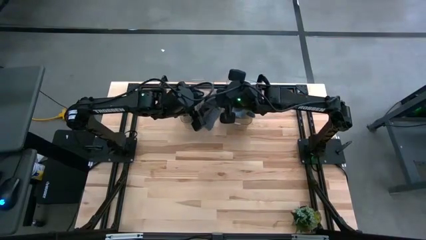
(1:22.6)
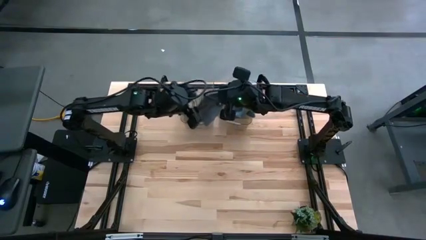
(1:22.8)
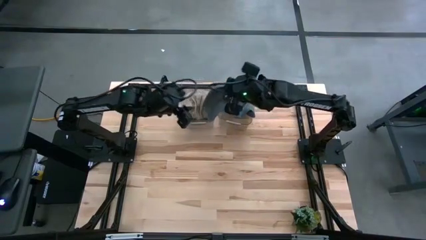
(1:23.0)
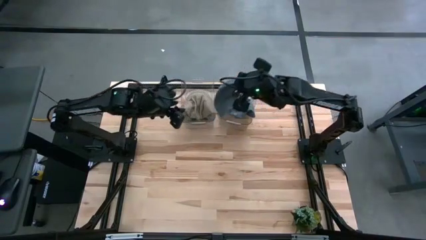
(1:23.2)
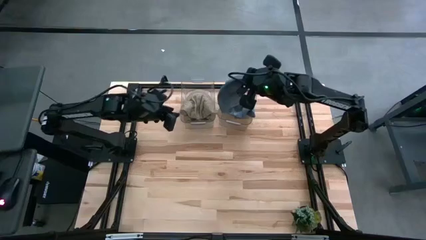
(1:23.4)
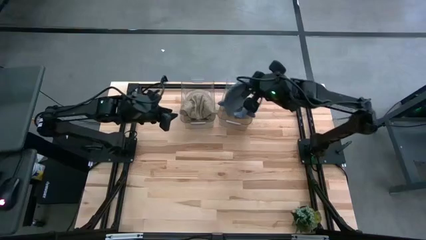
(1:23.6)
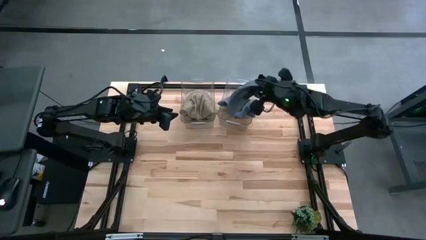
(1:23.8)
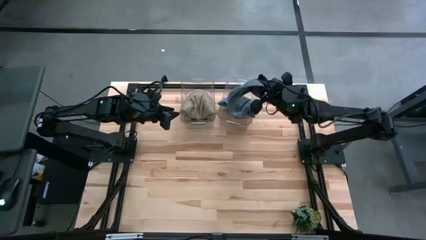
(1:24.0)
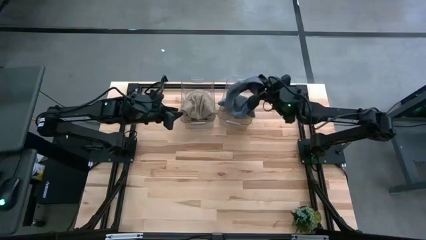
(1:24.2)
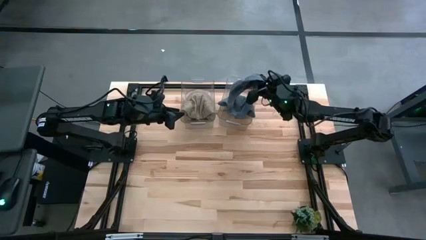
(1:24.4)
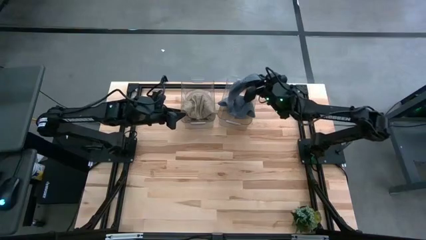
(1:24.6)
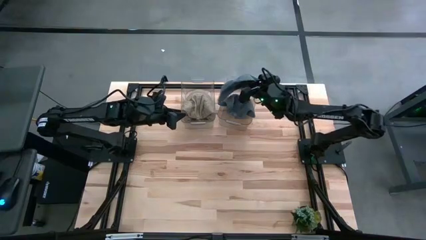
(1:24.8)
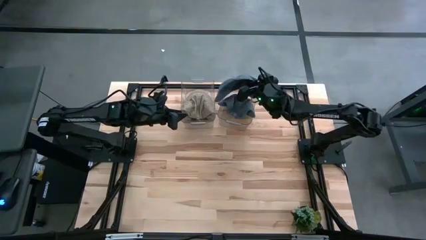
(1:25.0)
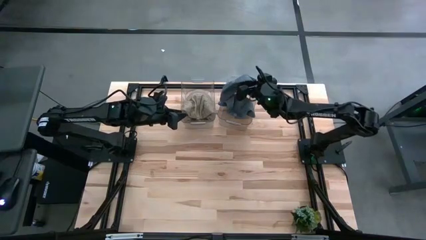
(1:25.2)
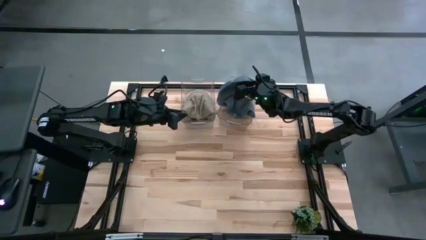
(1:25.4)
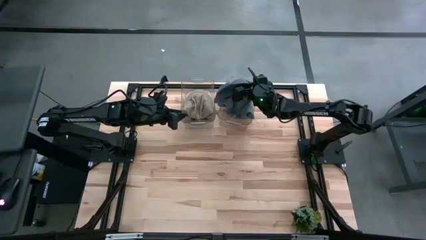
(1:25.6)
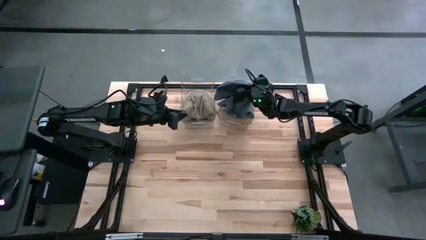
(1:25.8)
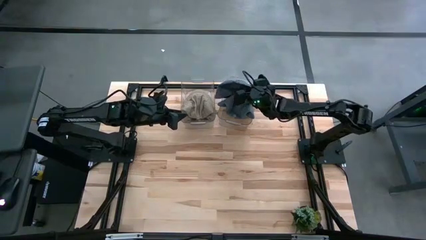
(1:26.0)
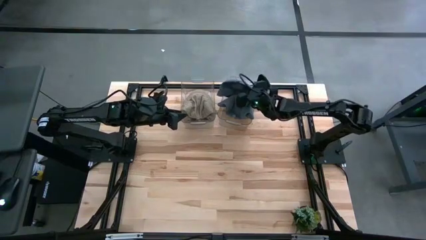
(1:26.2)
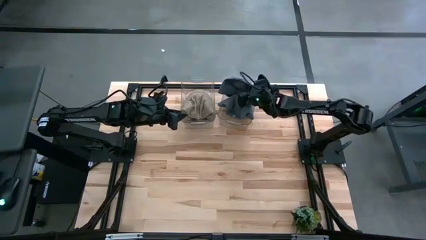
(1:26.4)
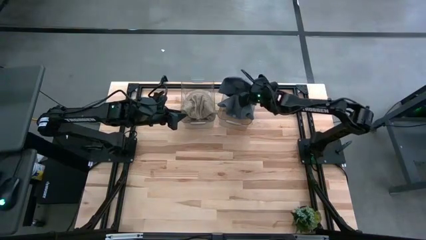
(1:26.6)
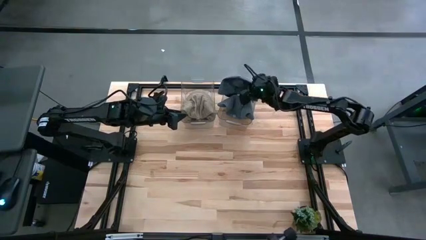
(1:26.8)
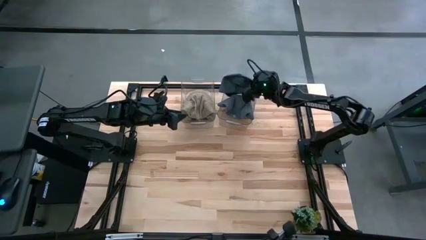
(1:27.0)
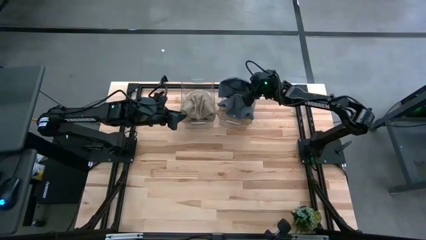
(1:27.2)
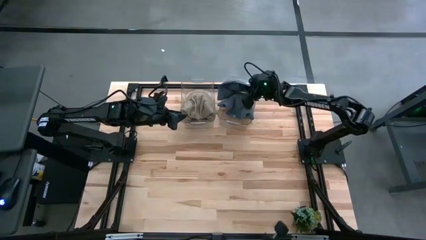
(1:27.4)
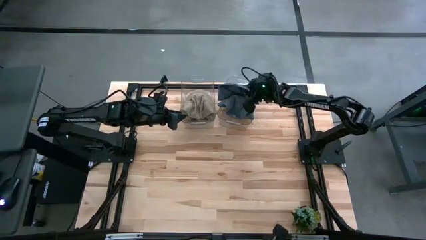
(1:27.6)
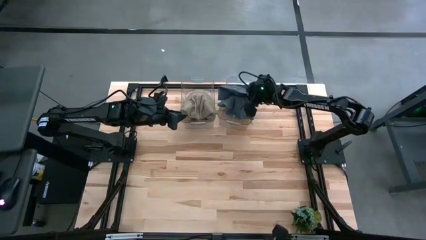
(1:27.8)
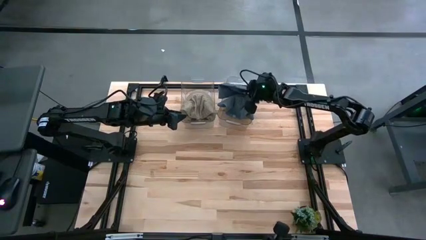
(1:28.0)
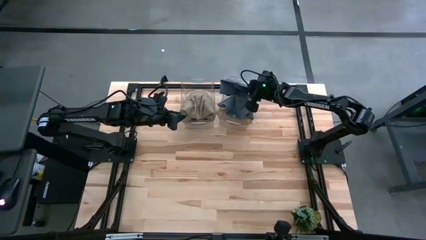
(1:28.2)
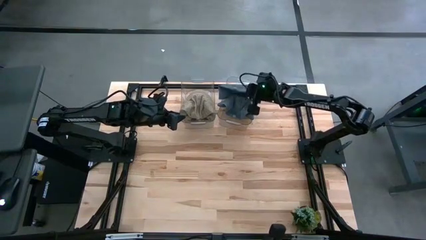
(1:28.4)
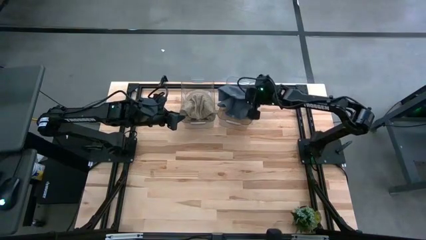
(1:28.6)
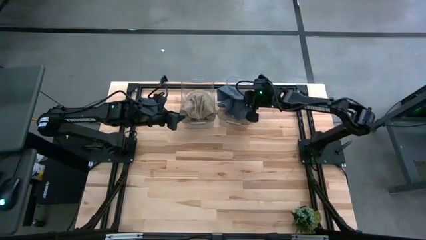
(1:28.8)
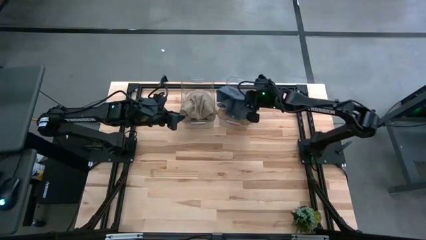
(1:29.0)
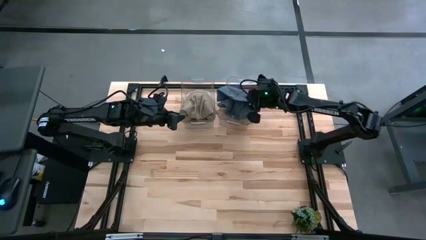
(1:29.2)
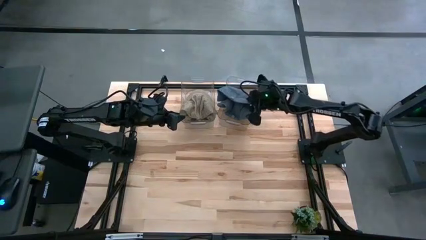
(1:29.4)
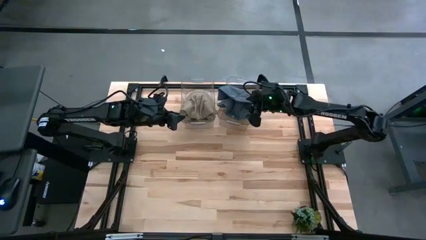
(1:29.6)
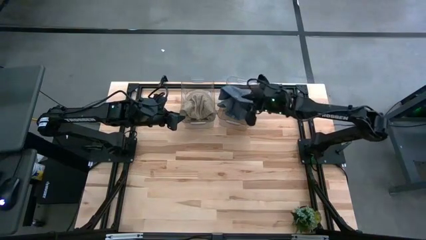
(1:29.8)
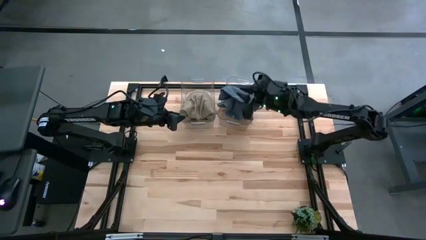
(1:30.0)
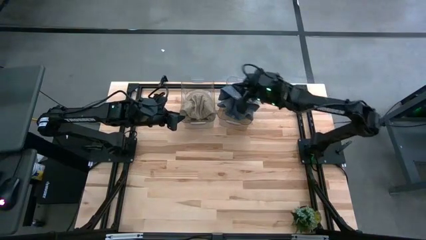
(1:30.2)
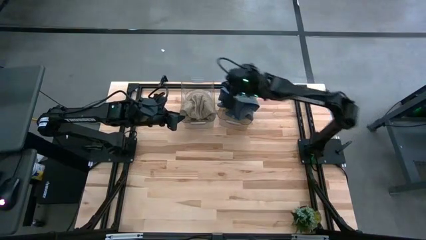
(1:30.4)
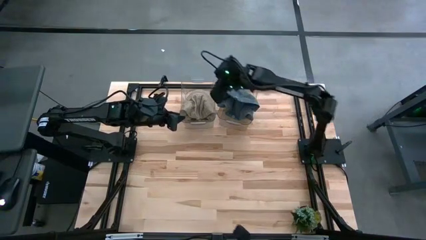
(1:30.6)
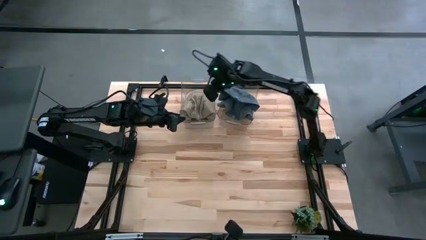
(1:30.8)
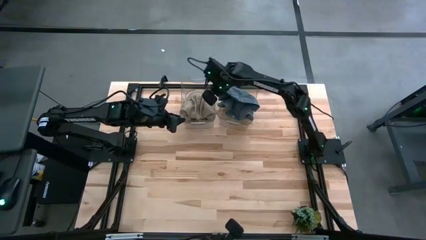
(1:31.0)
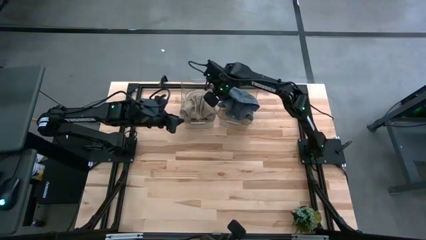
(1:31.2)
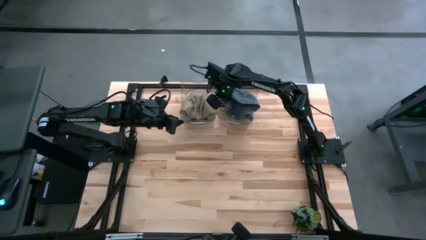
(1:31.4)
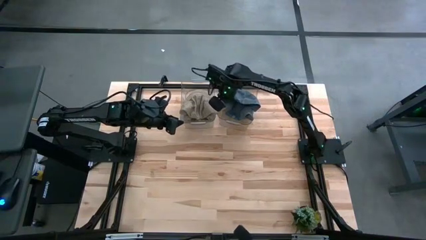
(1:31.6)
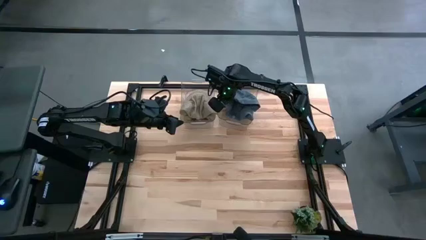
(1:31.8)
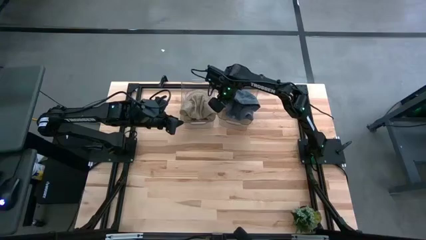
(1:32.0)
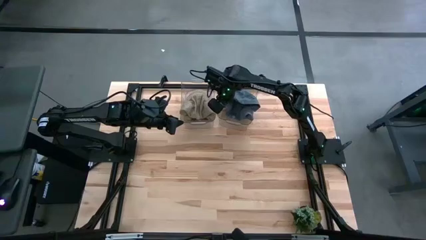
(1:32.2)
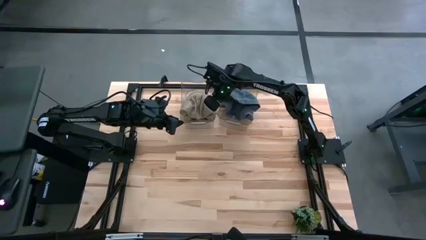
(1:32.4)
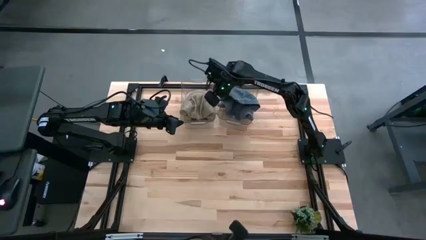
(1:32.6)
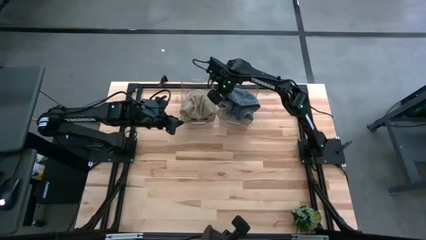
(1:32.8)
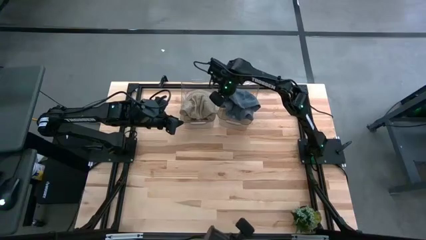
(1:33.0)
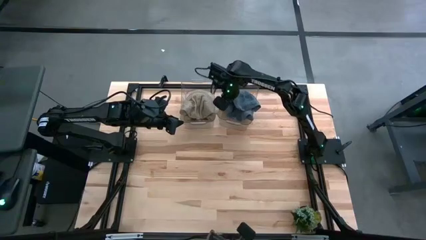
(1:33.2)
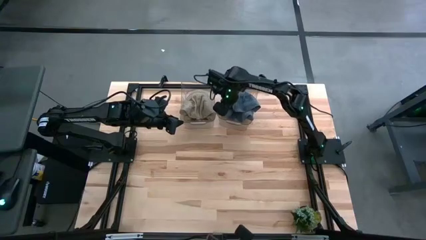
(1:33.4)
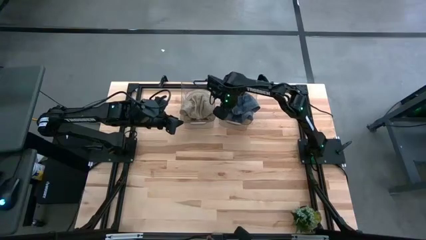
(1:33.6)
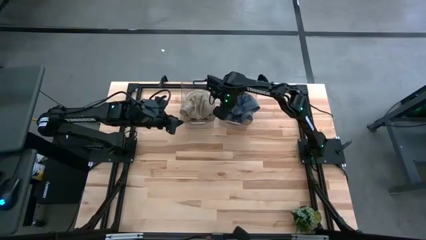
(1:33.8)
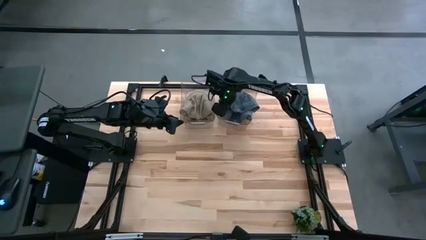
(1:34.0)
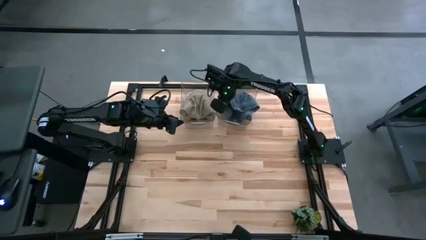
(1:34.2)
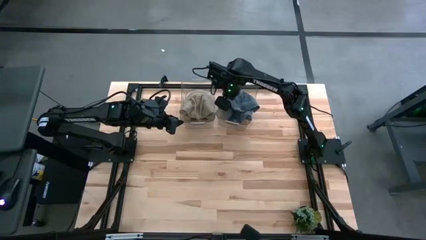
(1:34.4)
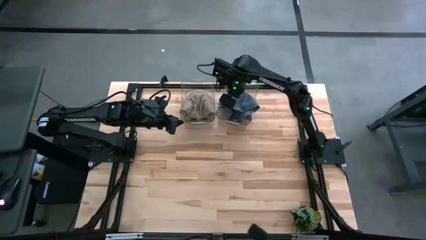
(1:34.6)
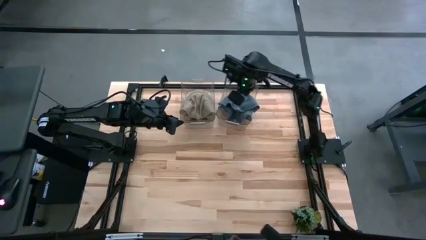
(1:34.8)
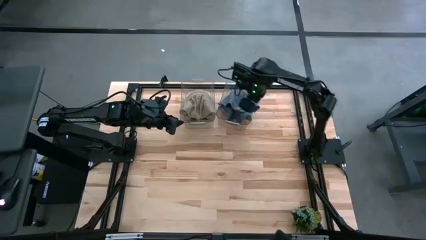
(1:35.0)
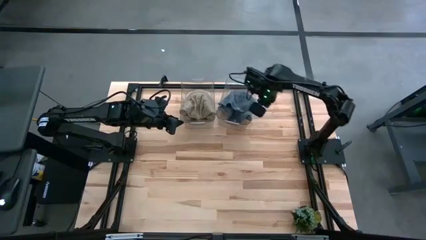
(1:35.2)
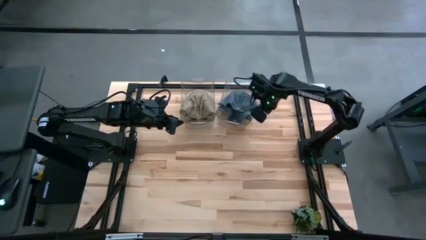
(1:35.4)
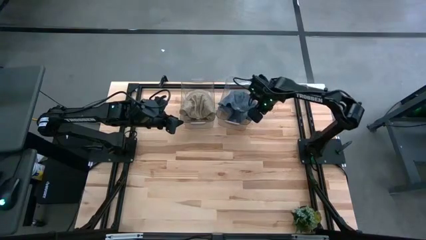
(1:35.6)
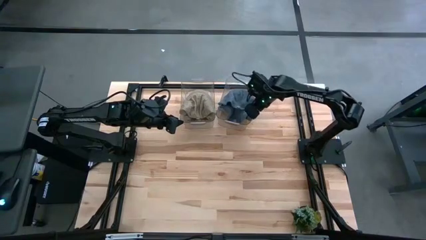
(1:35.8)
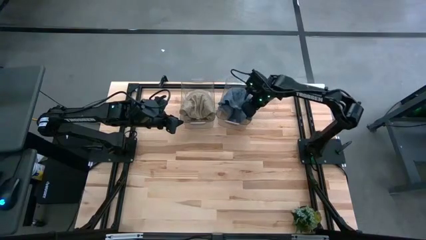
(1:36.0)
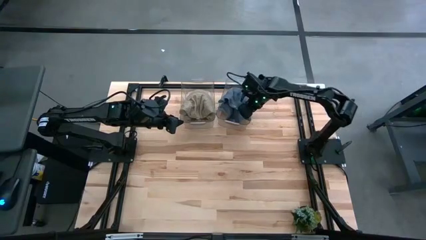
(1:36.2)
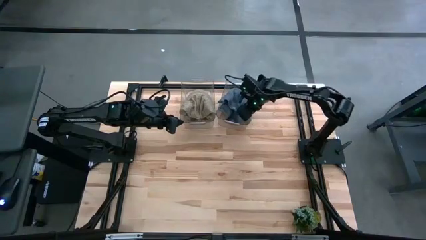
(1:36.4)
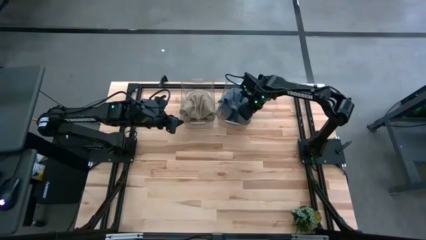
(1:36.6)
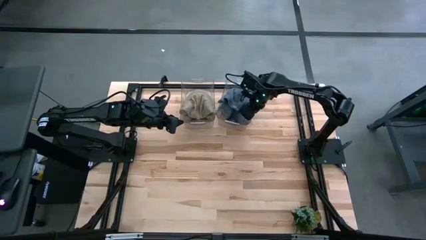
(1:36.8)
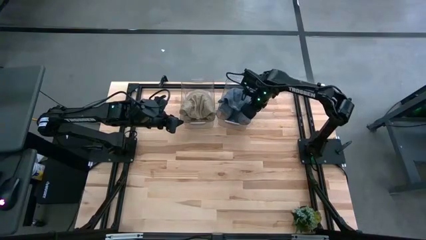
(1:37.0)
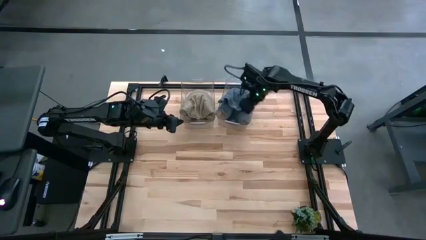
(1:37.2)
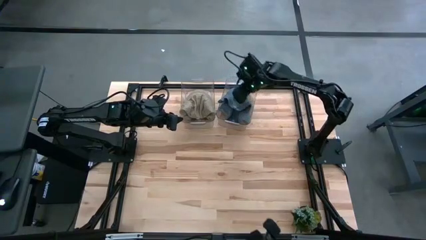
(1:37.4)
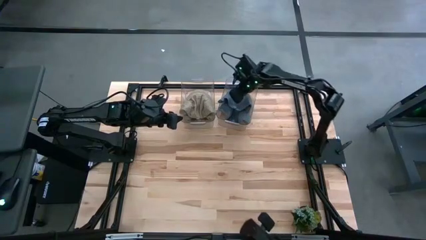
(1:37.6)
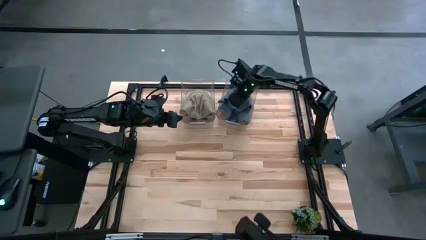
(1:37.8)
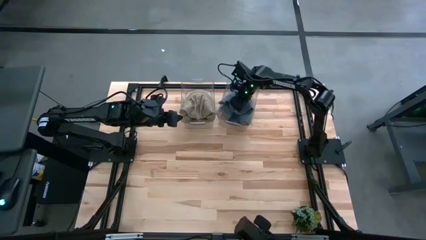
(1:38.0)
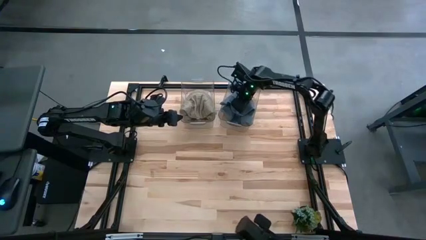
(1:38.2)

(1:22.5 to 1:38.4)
Task: Pick & Place hat
Put the blue cap into the right transparent bin
